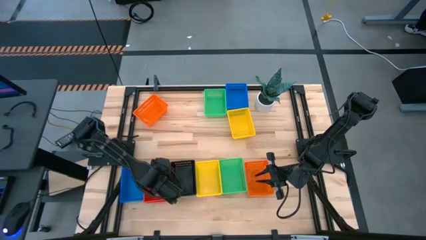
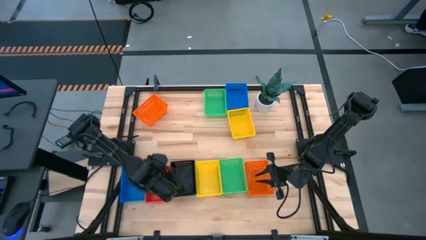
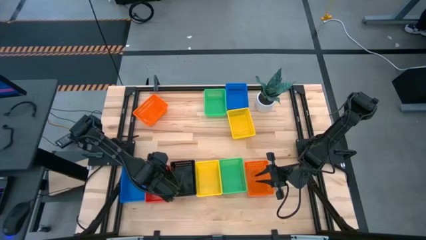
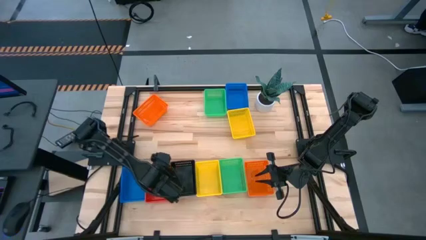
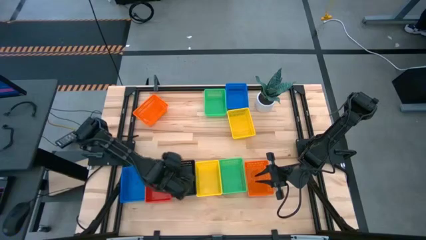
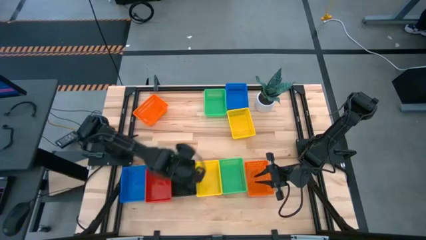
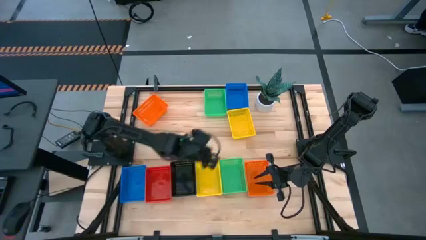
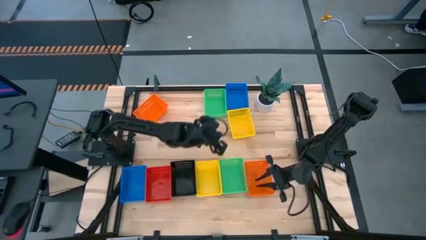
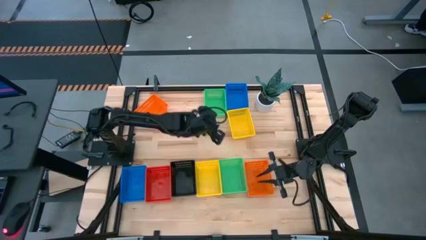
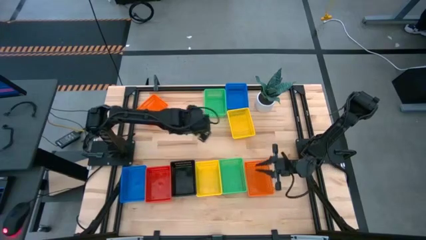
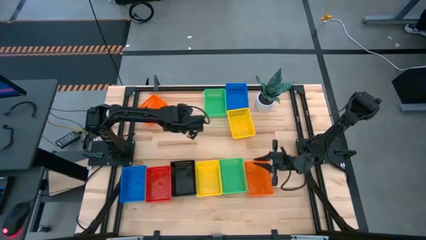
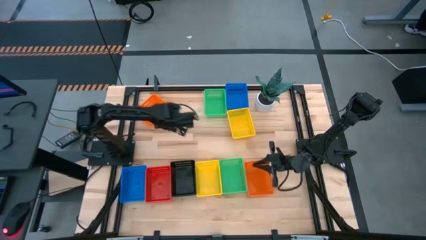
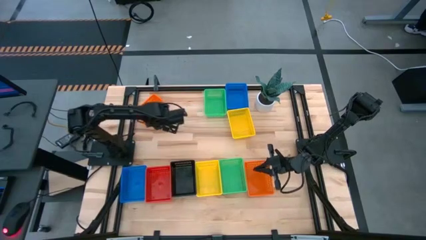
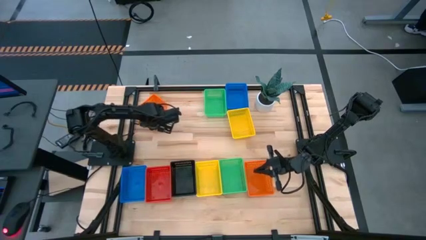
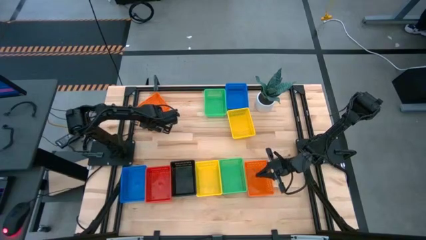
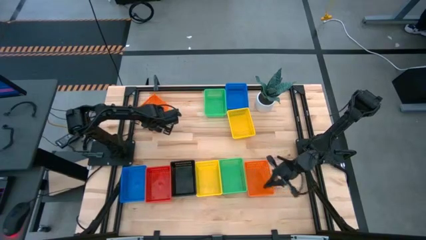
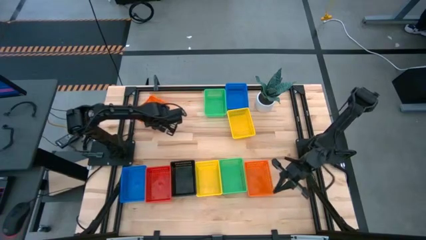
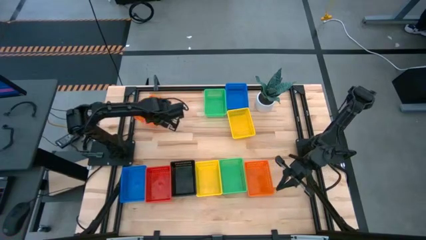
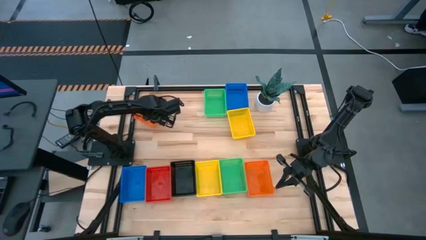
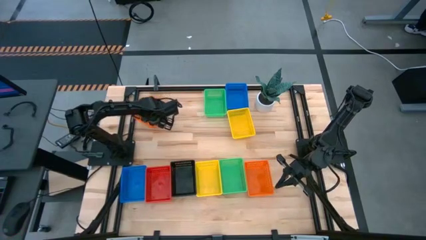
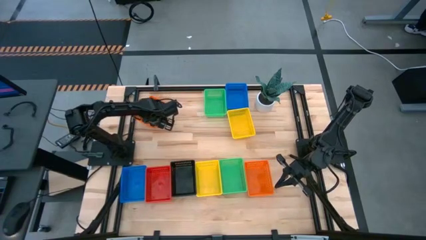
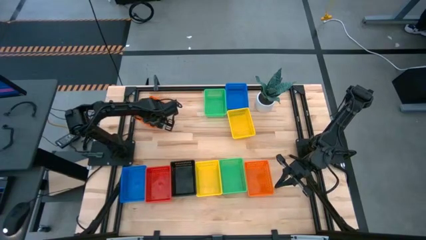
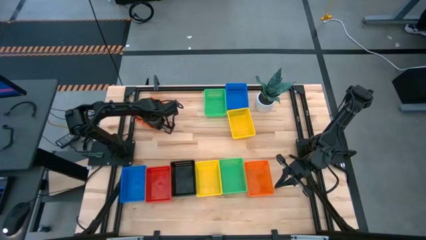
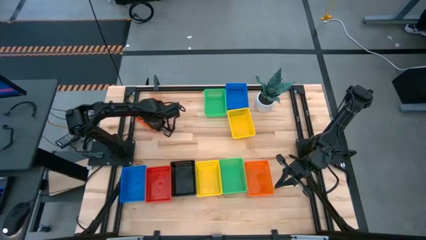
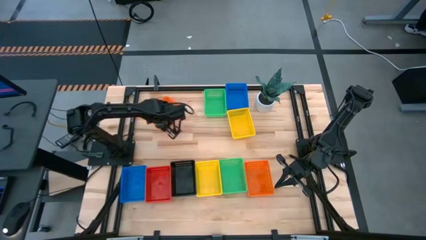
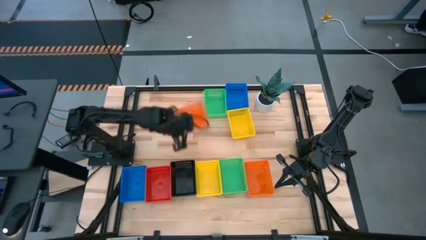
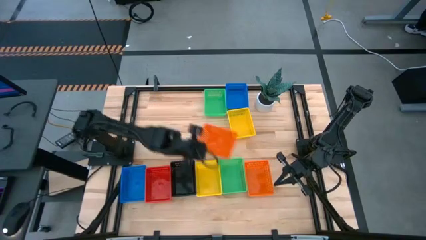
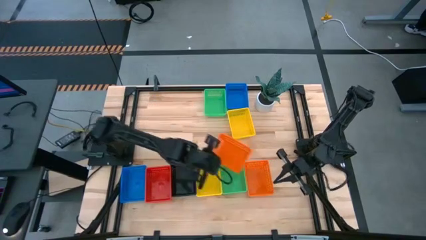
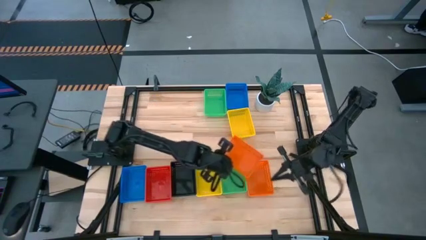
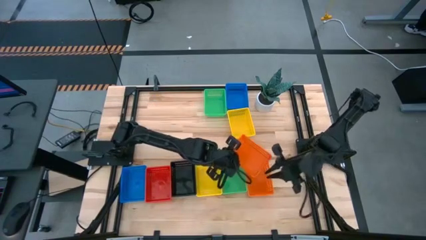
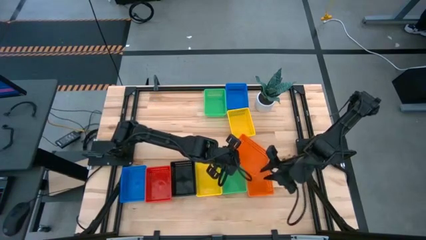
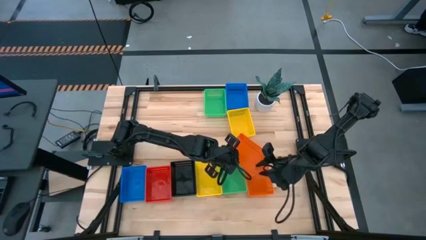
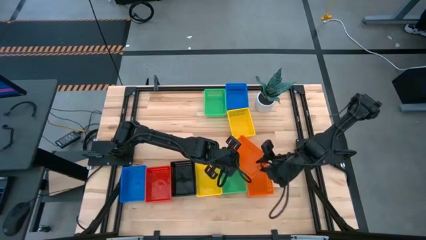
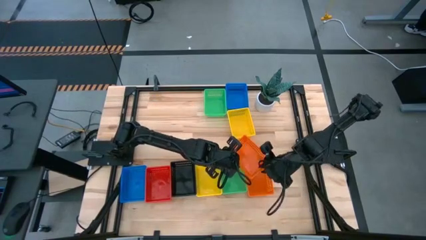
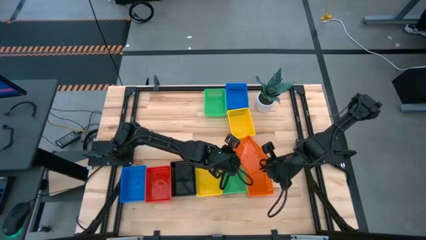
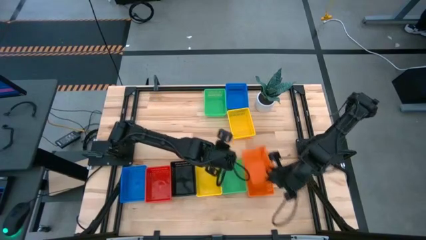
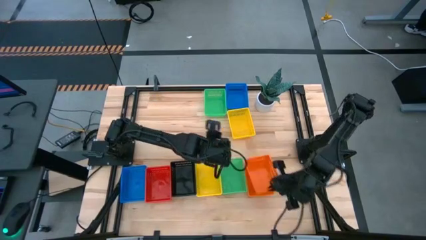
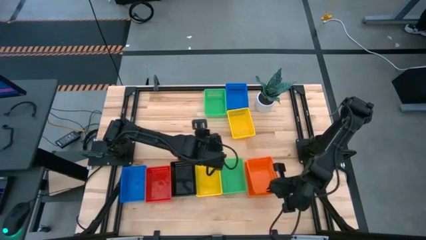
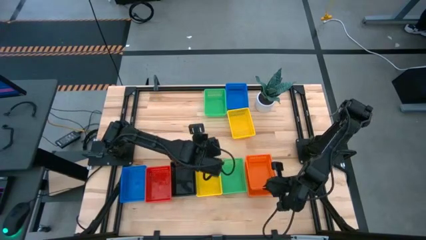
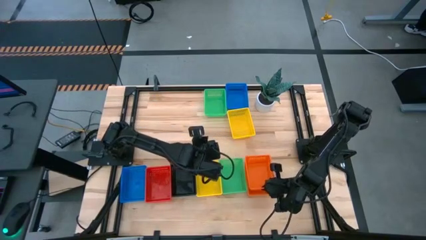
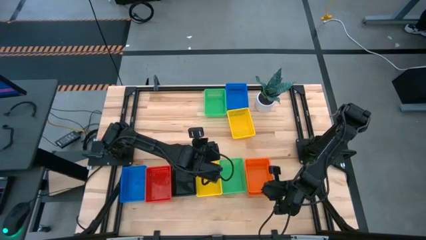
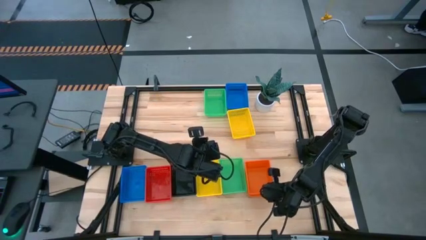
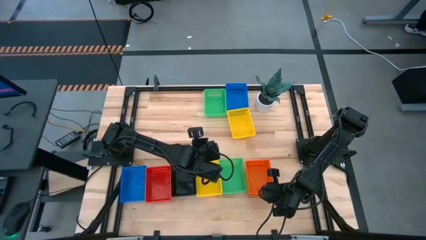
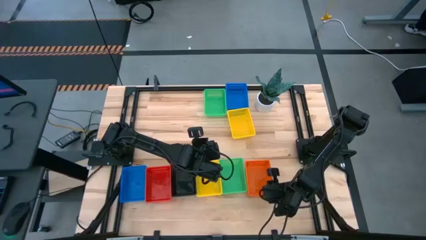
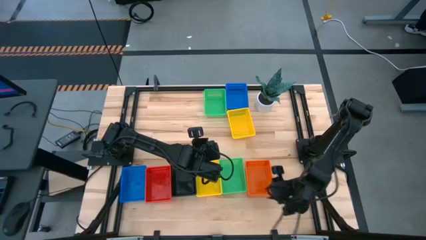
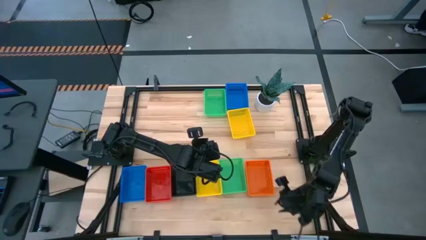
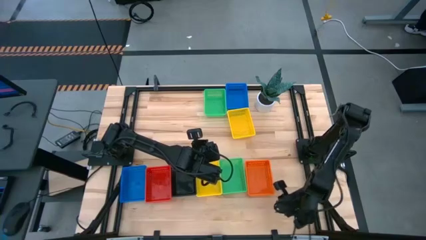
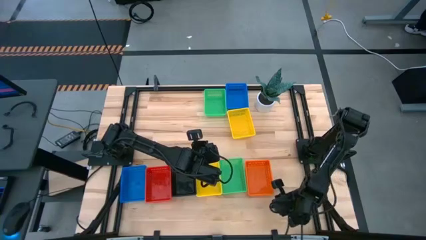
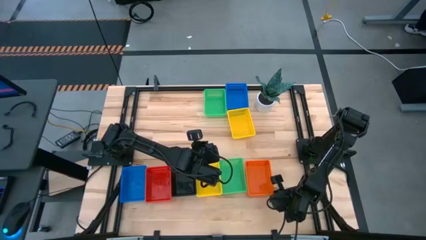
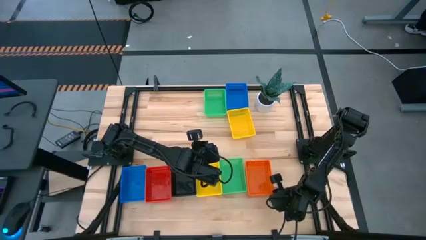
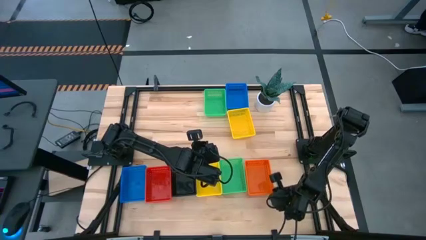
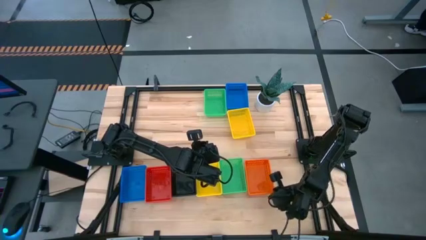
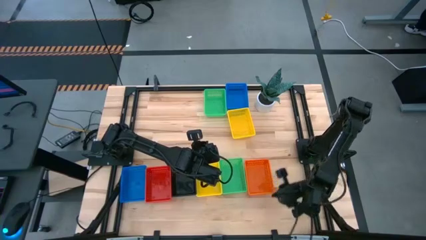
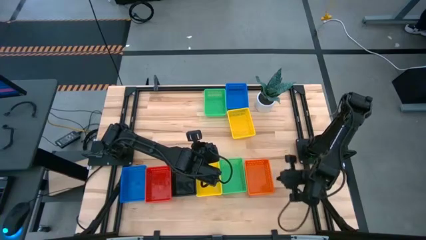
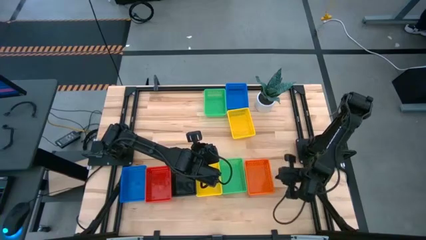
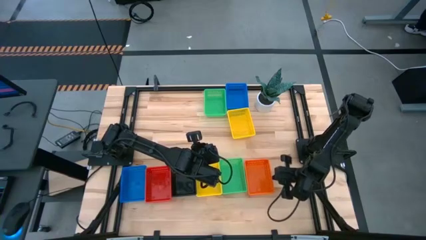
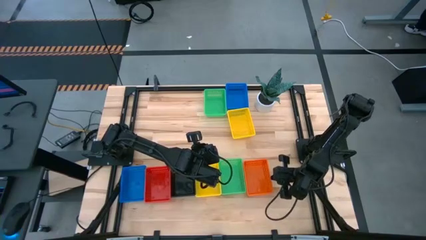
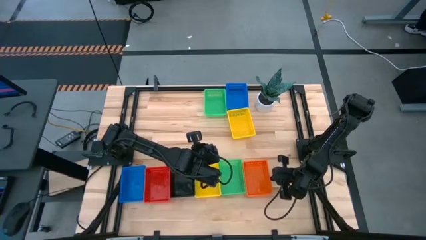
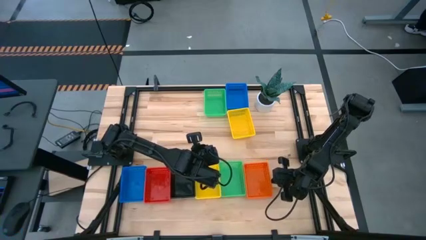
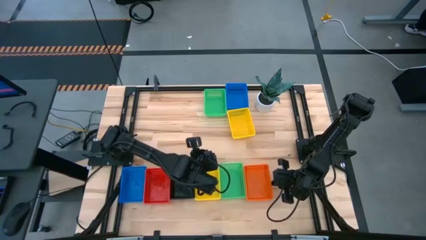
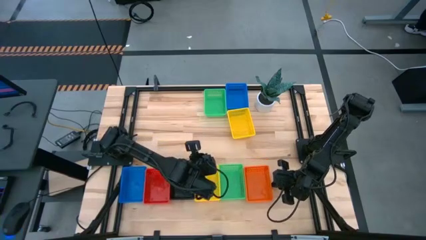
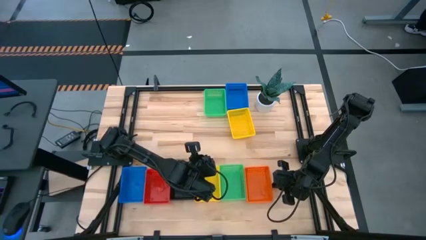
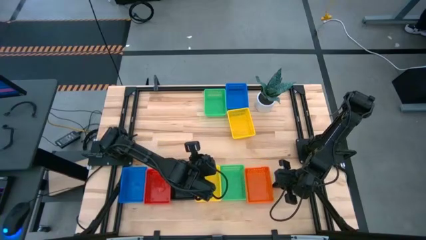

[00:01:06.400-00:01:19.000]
Stack the top orange bin on top of the orange bin

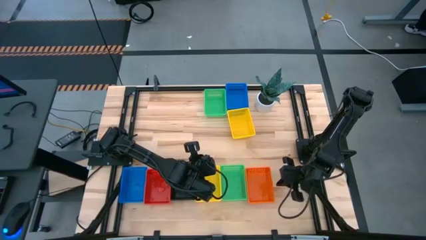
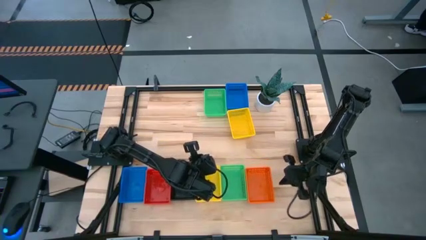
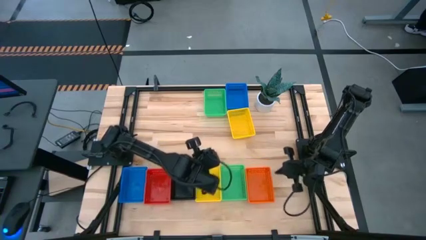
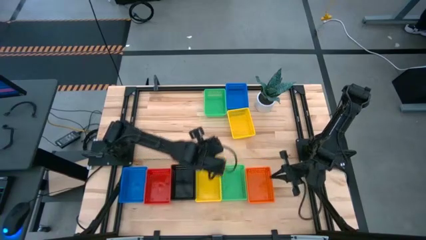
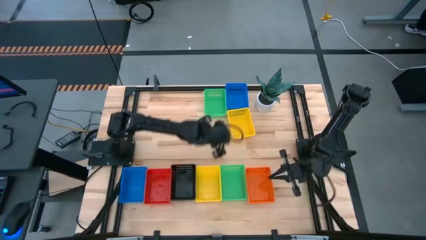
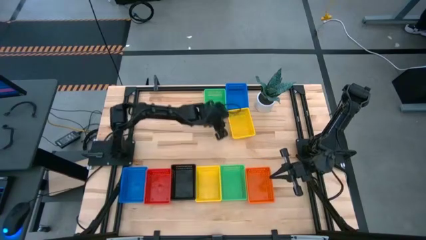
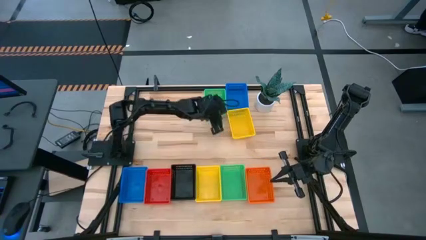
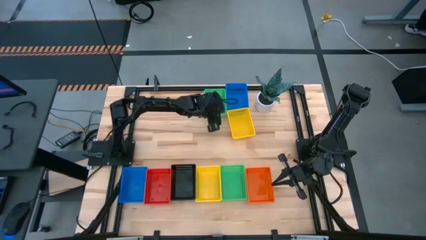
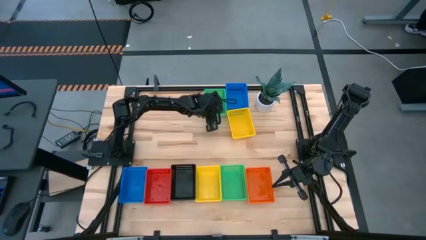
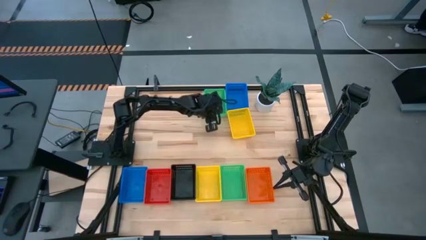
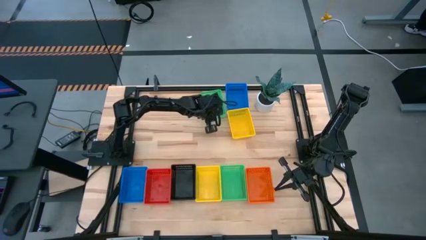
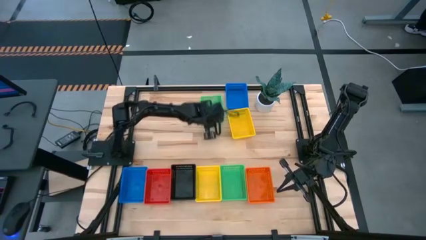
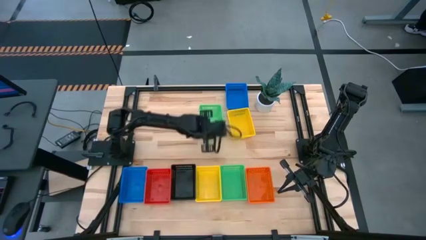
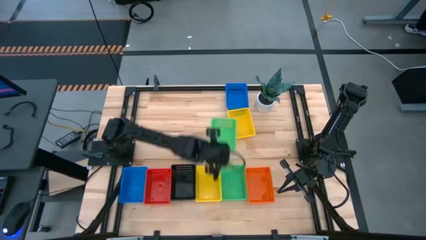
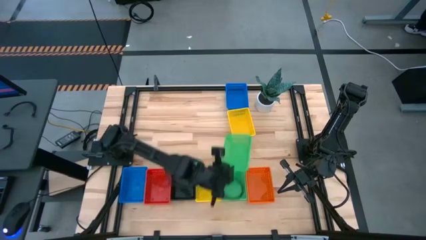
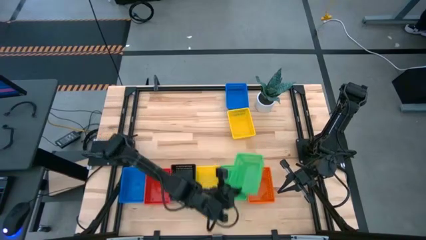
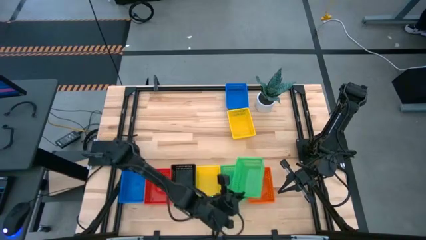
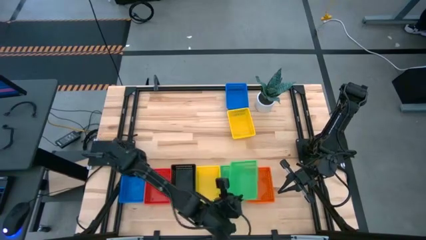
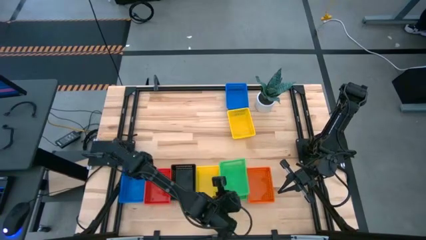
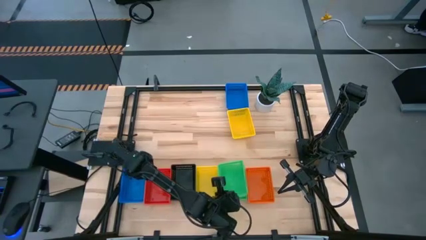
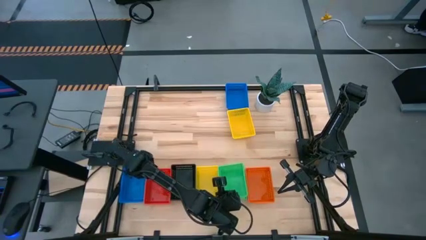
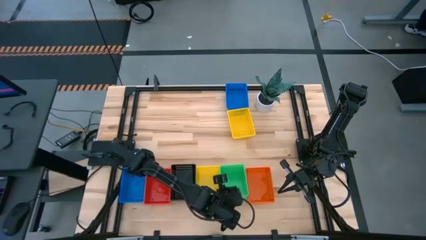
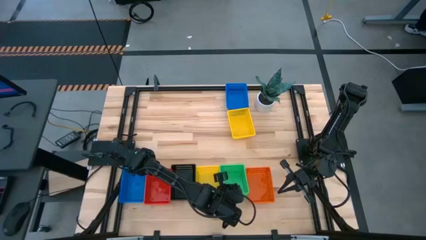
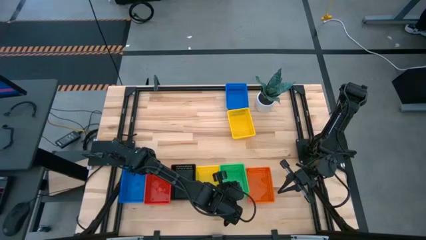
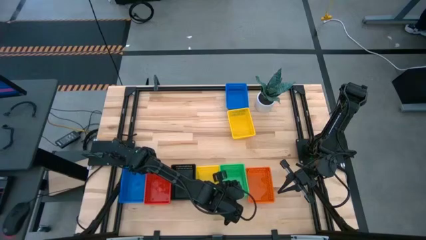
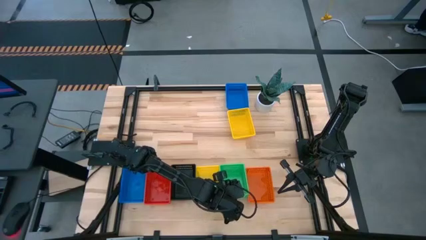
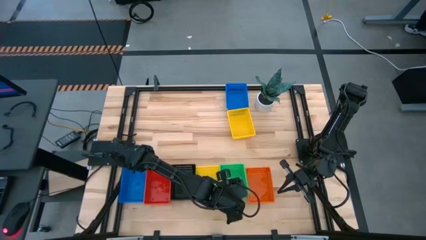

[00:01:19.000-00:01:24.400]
Stack the top green bin on top of the green bin
